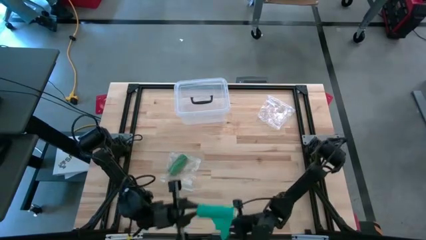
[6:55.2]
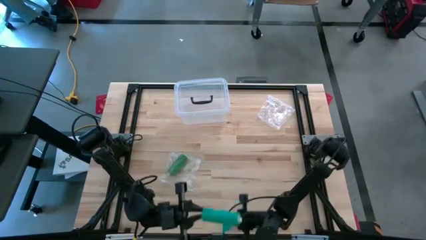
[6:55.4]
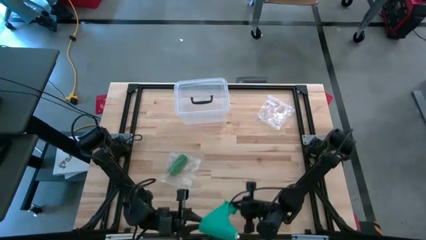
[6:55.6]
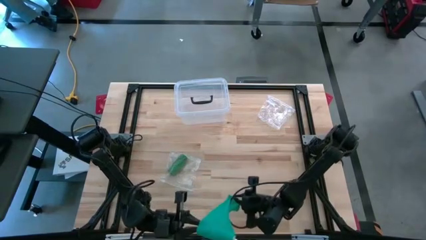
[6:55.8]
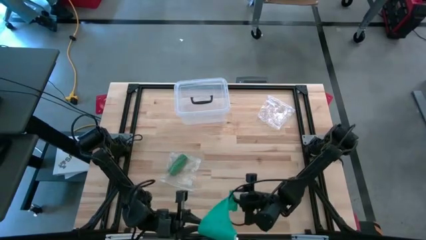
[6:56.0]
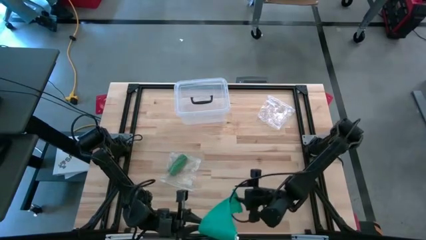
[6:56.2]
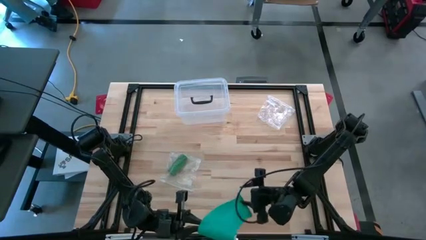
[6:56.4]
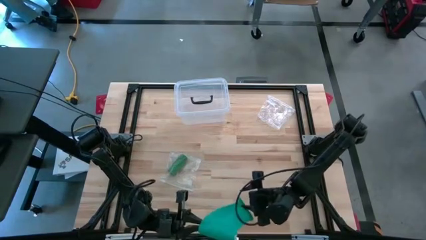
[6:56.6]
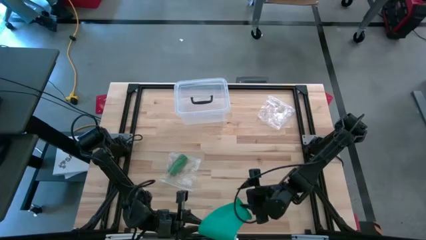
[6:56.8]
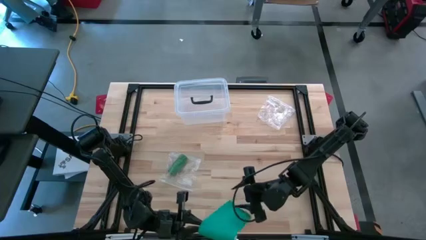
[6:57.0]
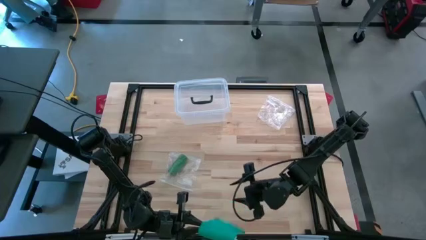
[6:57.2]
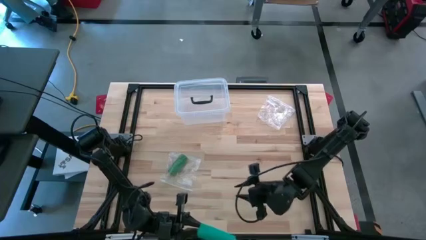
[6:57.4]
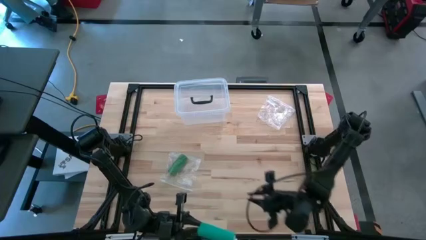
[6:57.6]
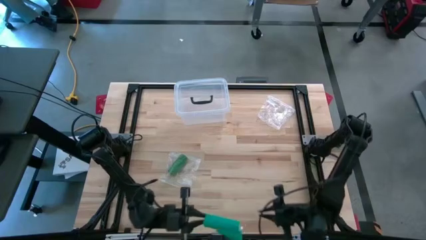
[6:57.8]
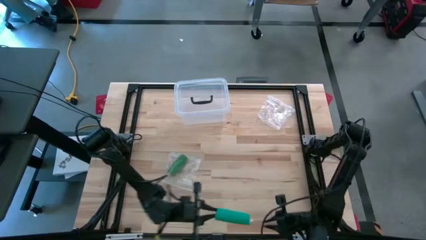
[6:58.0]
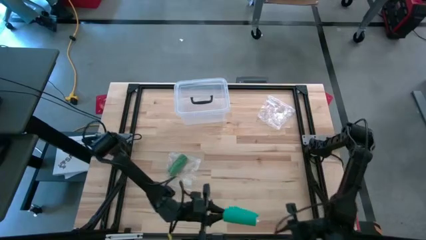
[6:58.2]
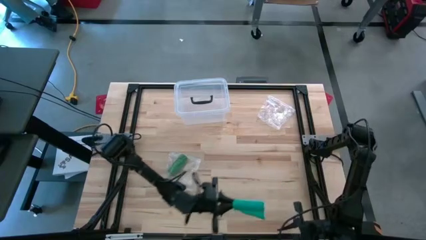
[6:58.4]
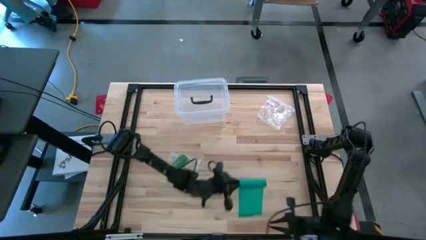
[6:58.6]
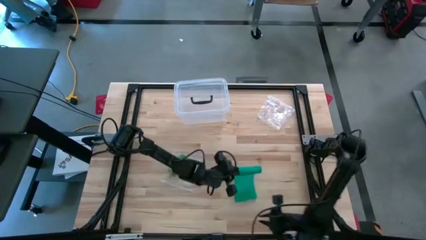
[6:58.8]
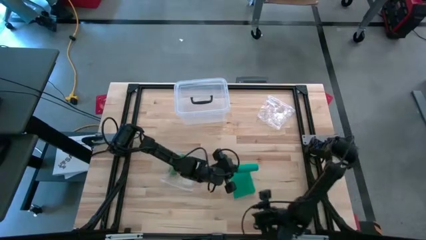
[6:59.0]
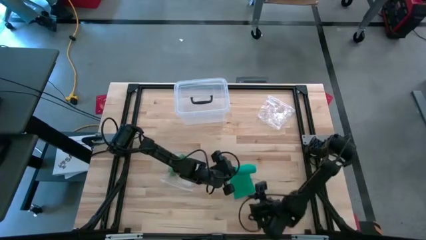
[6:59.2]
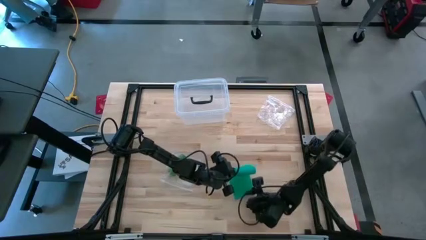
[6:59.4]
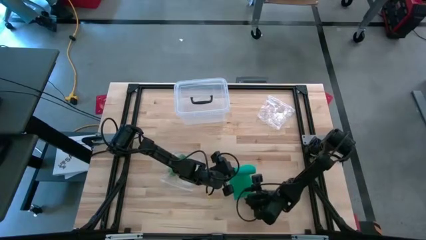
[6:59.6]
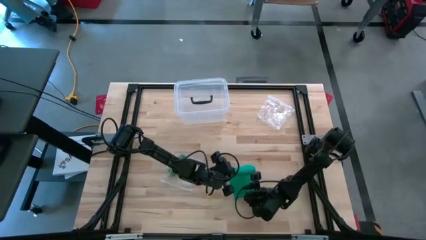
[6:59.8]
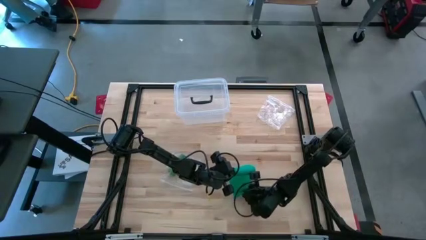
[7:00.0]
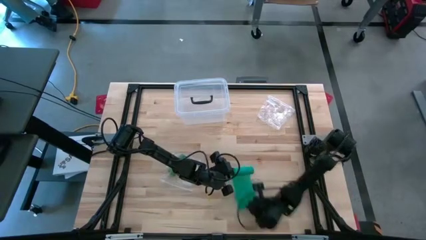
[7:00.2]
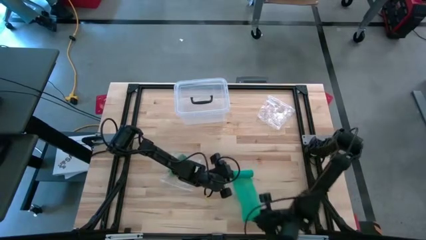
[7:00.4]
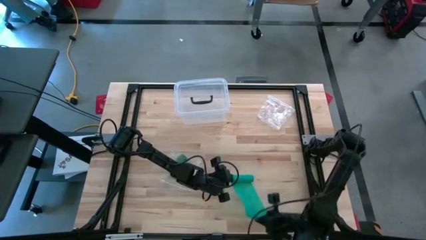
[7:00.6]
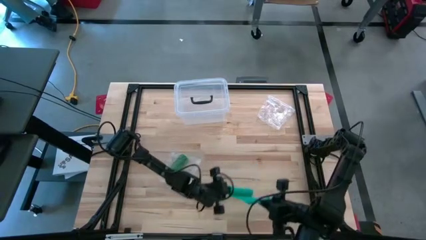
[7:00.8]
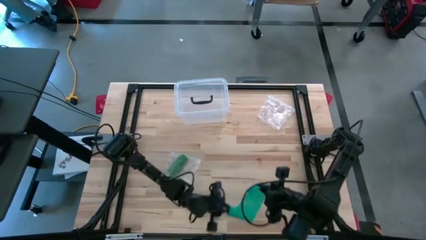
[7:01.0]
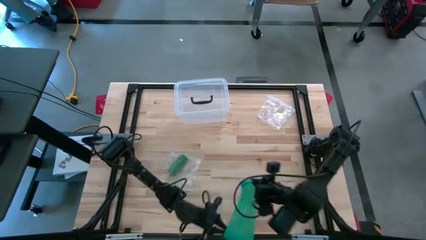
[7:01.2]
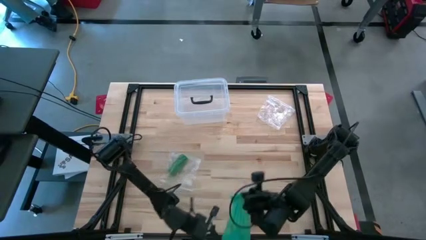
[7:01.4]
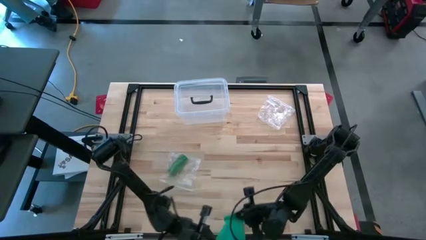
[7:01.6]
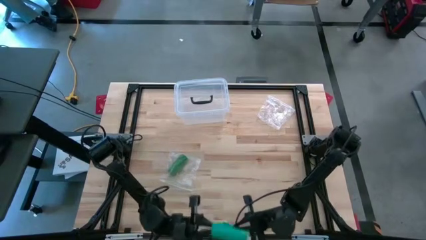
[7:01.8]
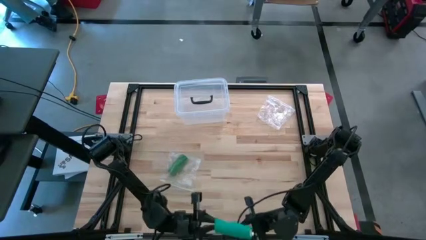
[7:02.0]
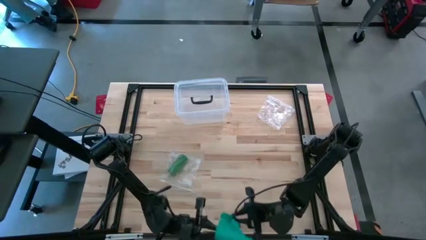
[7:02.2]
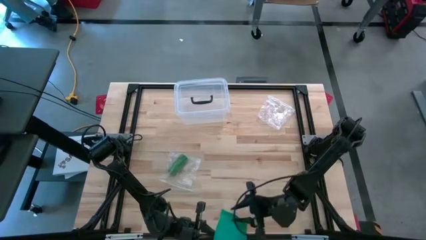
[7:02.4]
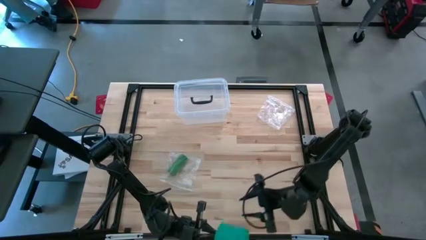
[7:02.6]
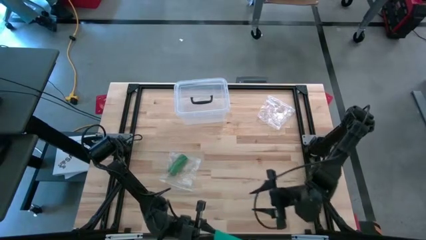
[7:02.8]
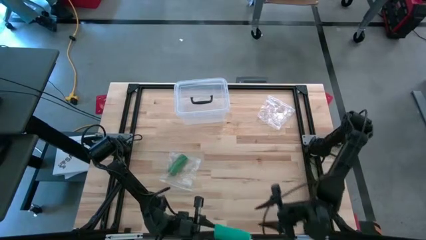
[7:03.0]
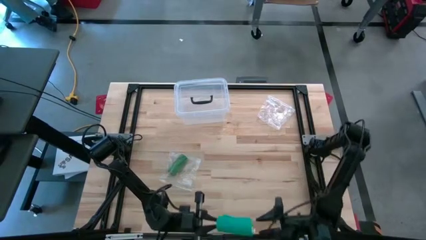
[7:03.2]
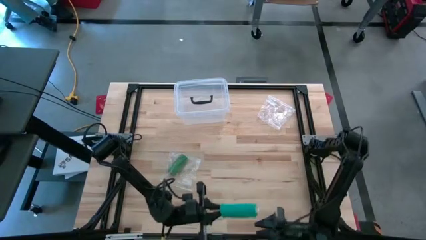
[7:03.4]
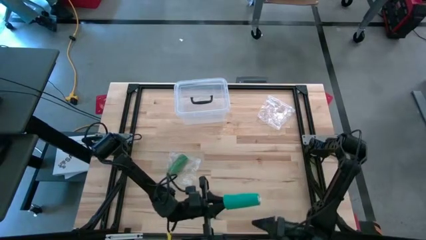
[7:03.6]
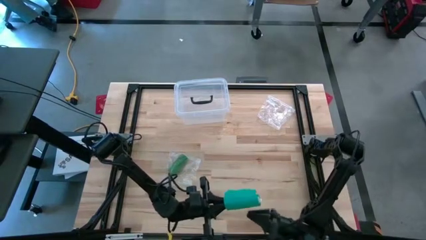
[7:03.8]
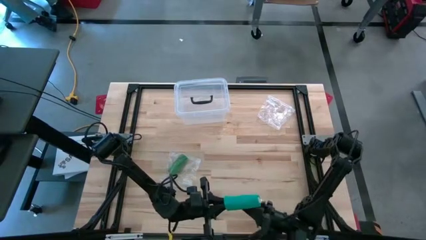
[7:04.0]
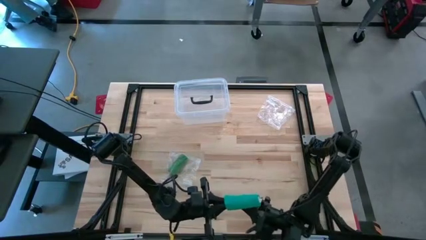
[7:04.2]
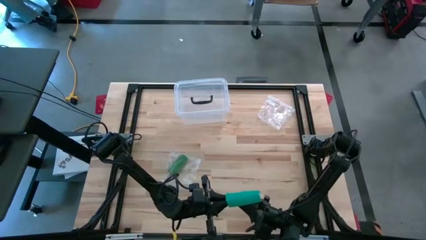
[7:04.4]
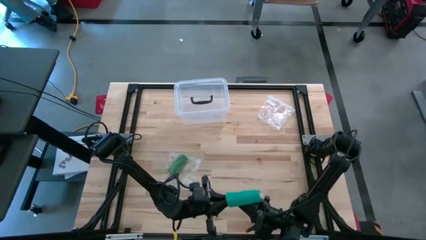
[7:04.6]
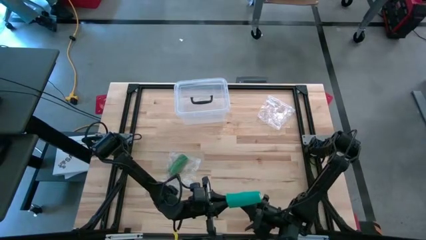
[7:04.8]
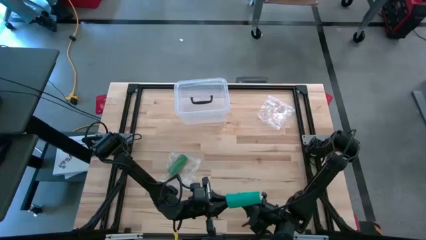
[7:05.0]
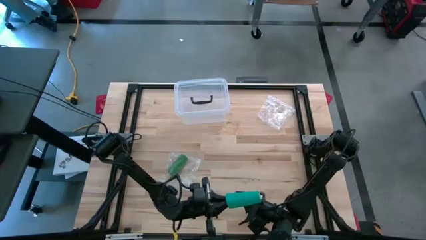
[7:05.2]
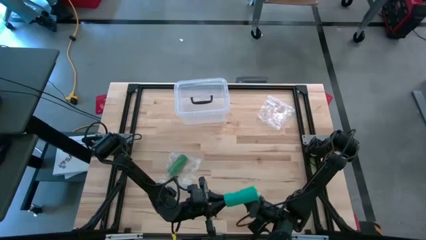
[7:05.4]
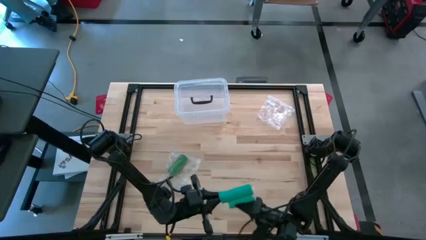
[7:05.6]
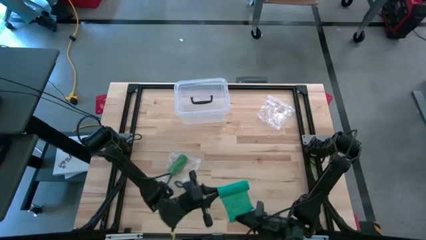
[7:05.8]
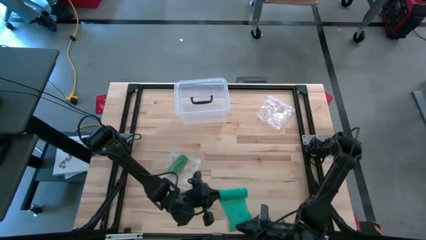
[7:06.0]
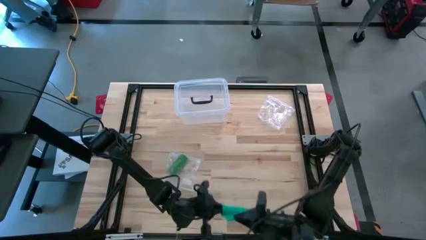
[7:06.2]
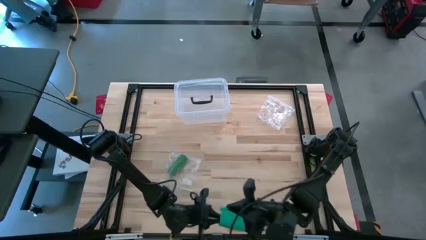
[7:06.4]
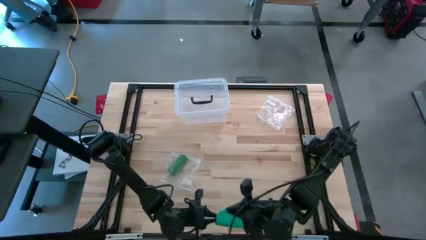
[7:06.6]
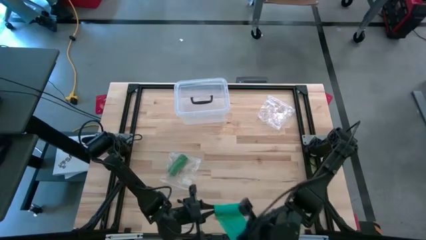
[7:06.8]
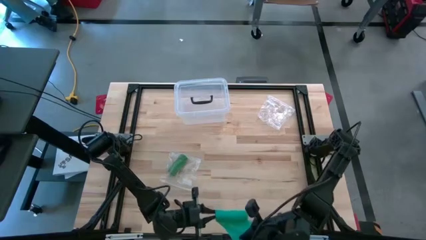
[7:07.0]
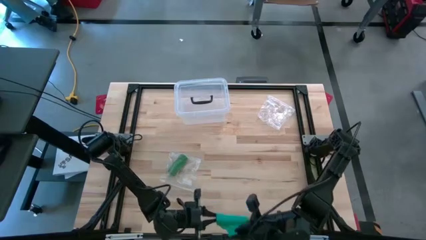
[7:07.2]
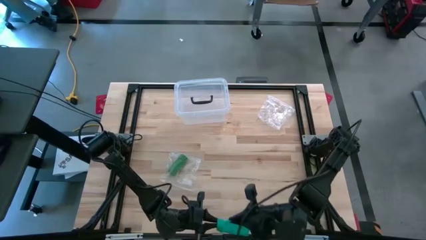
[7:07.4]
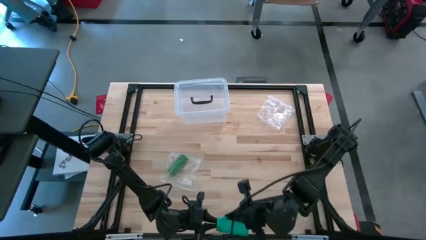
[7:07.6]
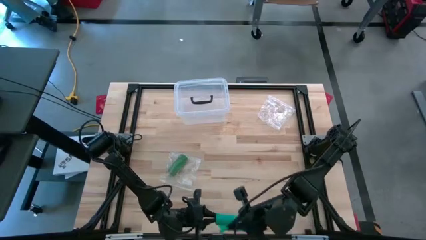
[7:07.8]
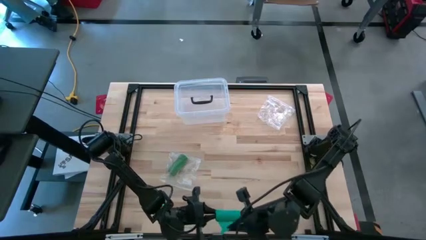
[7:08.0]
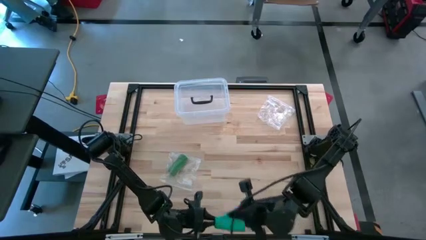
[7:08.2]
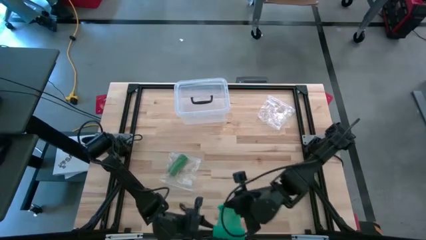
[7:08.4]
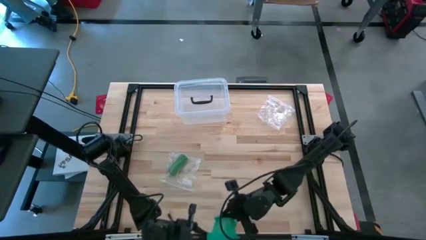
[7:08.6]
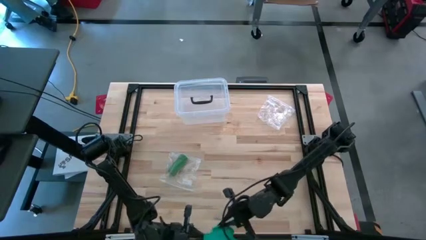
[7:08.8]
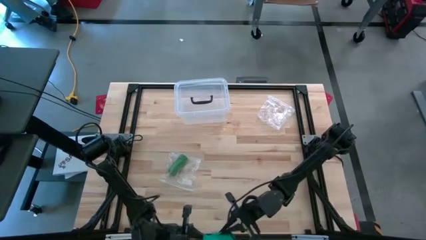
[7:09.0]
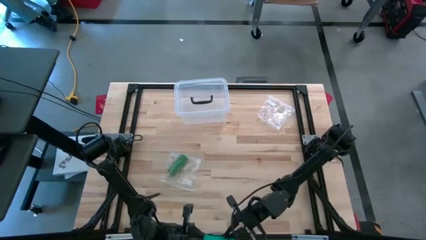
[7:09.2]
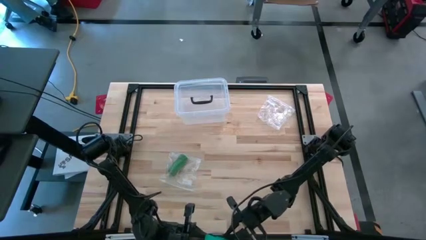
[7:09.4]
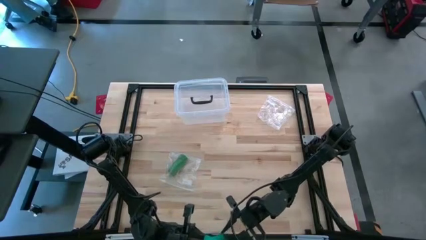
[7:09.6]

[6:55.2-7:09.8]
Task: Roll bandage
Roll the dark green bandage
